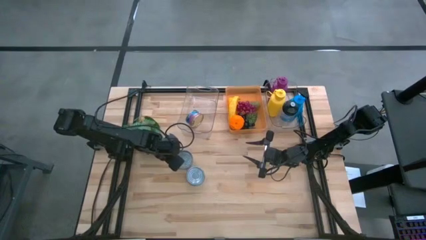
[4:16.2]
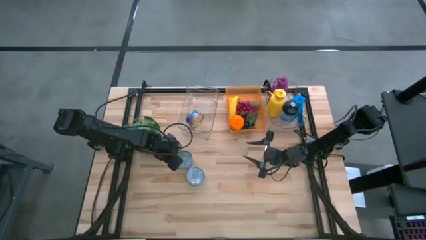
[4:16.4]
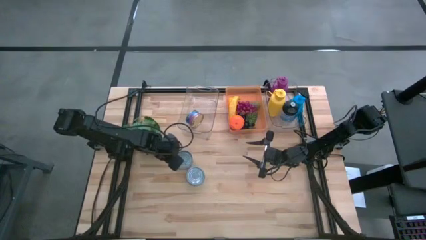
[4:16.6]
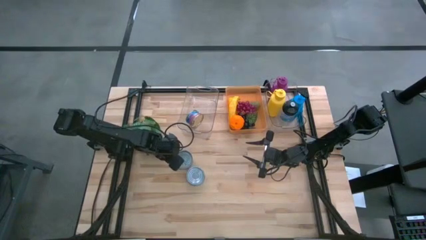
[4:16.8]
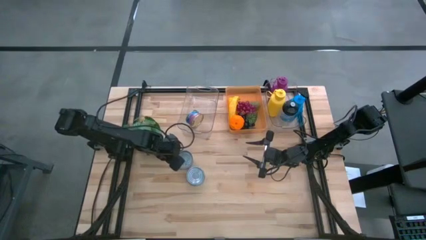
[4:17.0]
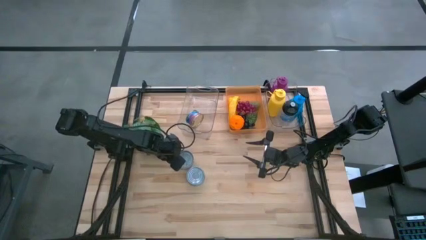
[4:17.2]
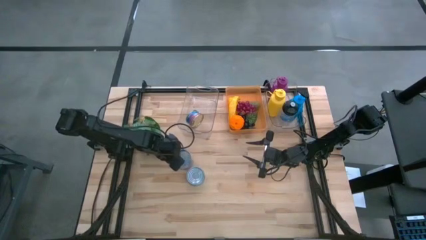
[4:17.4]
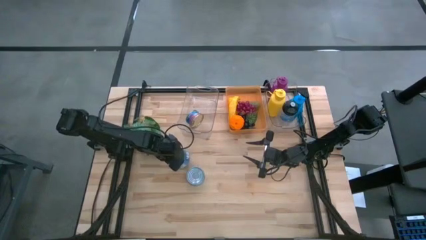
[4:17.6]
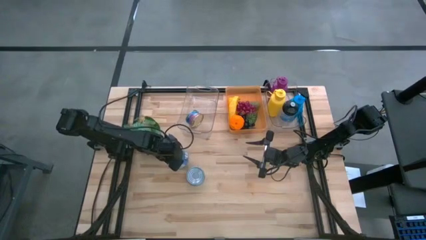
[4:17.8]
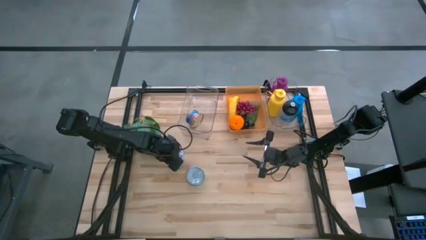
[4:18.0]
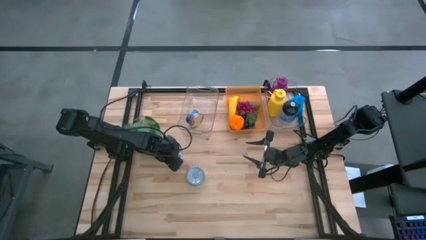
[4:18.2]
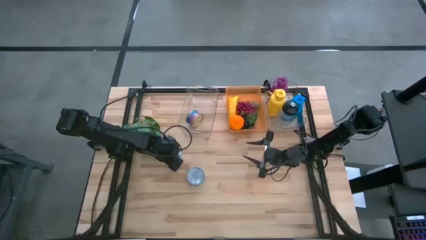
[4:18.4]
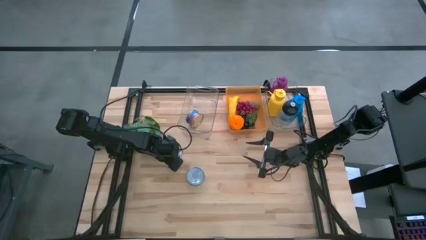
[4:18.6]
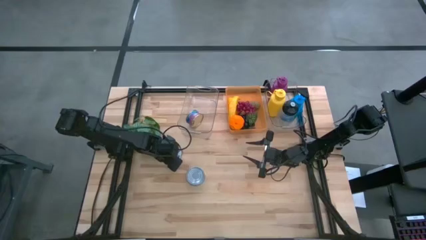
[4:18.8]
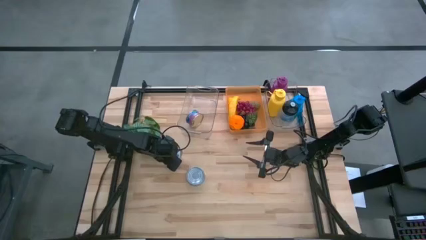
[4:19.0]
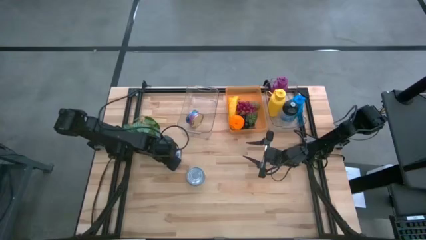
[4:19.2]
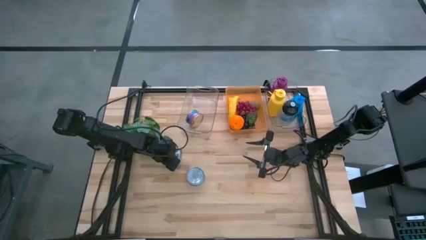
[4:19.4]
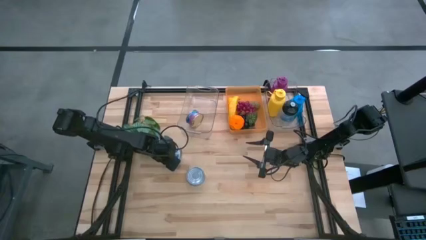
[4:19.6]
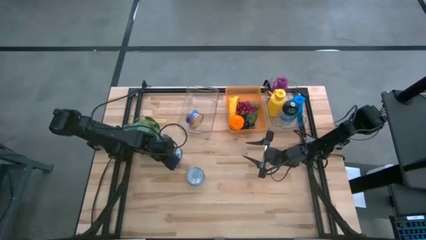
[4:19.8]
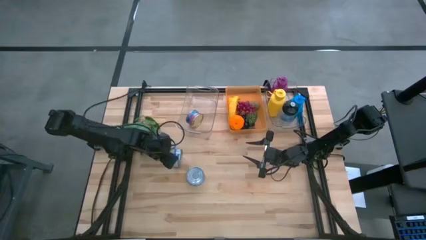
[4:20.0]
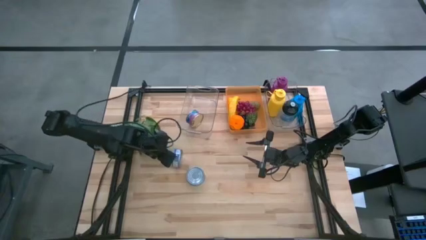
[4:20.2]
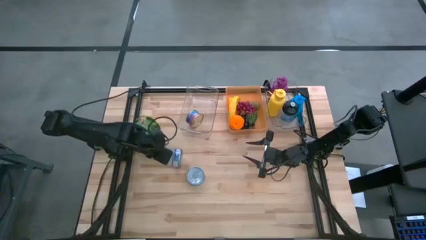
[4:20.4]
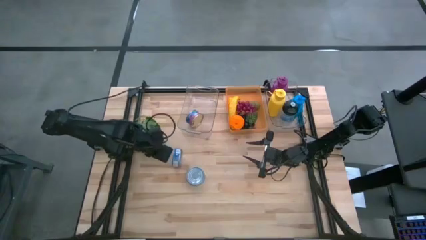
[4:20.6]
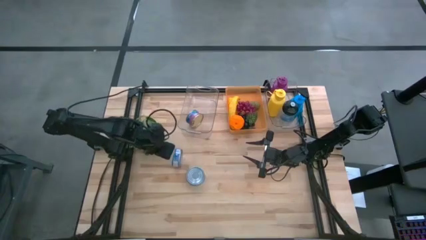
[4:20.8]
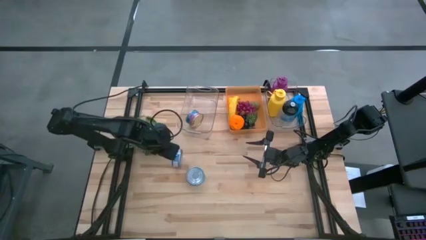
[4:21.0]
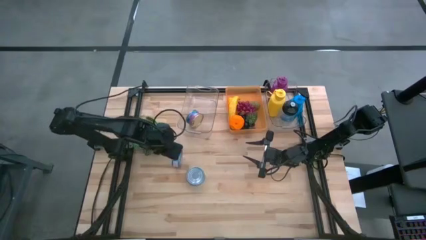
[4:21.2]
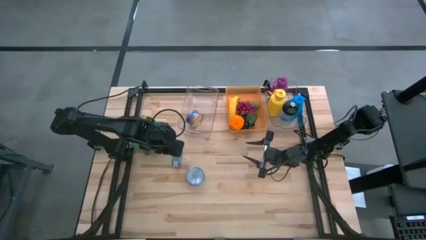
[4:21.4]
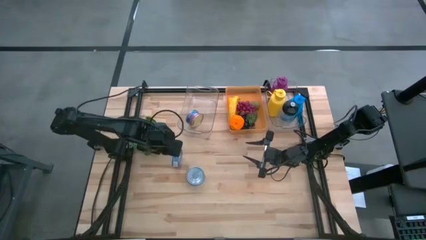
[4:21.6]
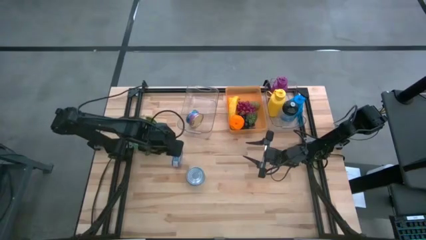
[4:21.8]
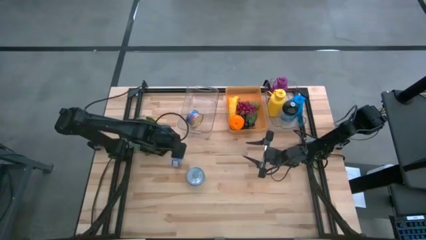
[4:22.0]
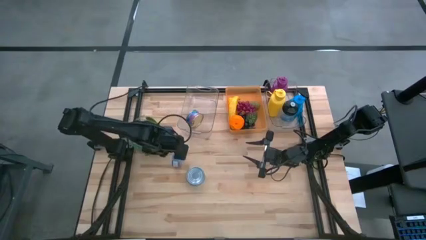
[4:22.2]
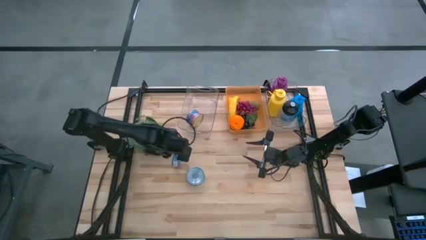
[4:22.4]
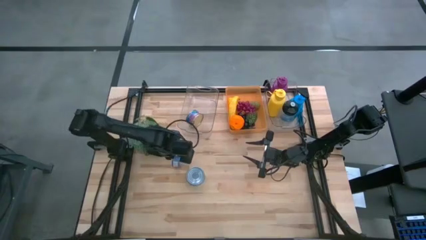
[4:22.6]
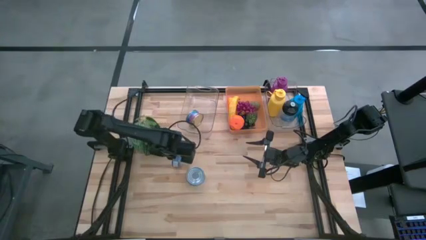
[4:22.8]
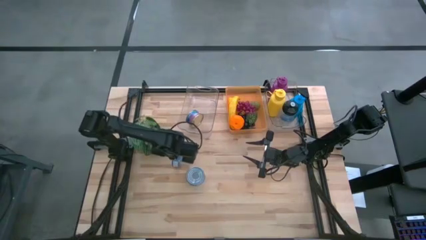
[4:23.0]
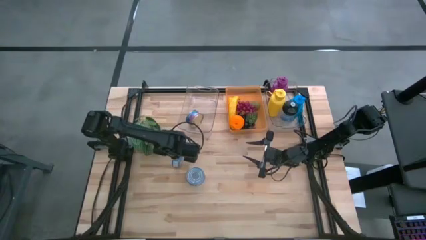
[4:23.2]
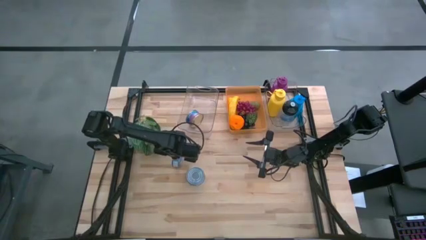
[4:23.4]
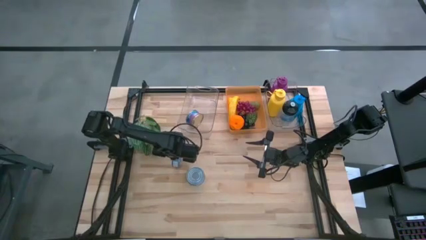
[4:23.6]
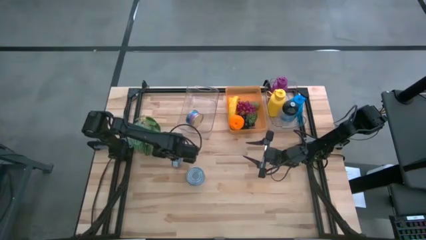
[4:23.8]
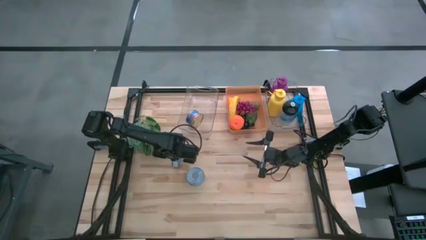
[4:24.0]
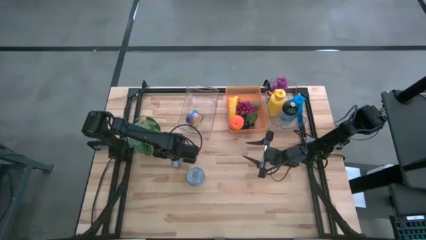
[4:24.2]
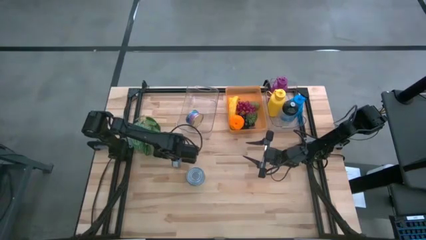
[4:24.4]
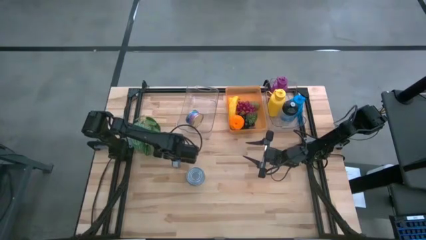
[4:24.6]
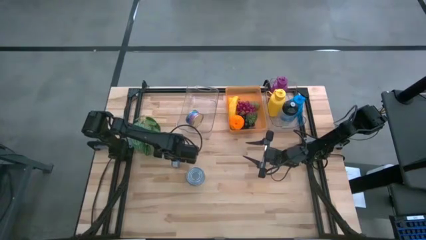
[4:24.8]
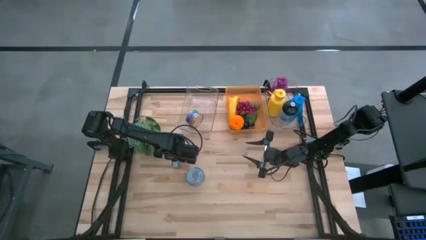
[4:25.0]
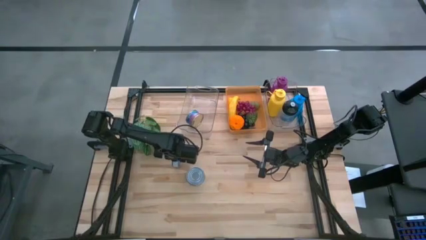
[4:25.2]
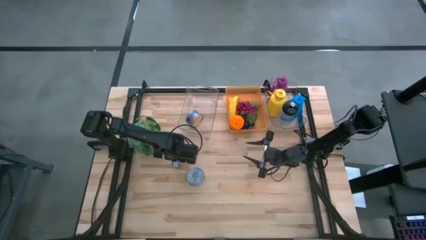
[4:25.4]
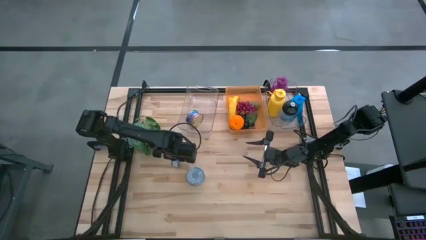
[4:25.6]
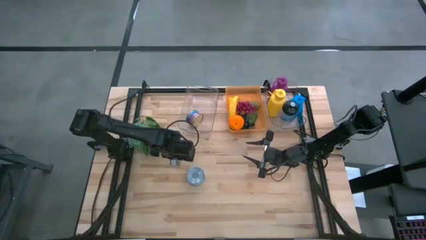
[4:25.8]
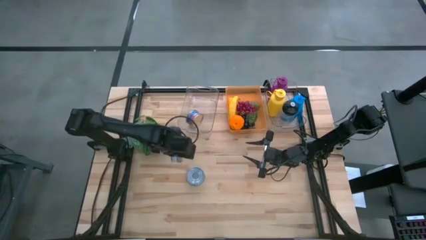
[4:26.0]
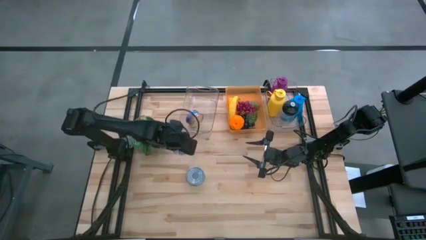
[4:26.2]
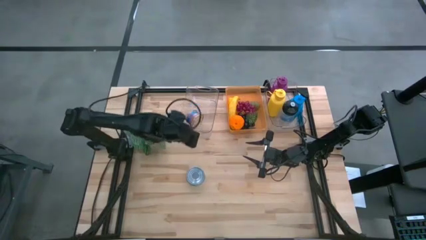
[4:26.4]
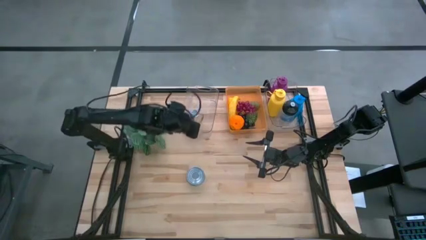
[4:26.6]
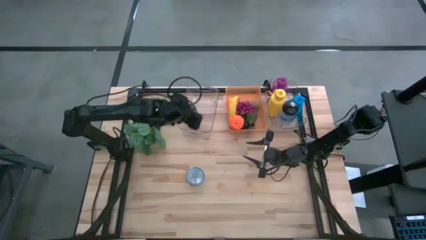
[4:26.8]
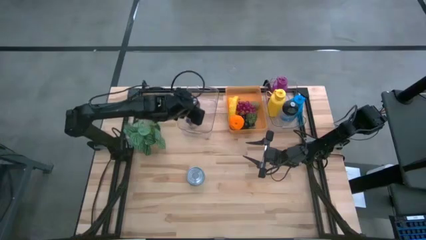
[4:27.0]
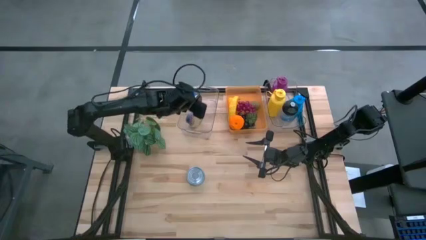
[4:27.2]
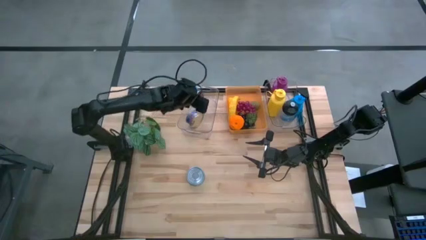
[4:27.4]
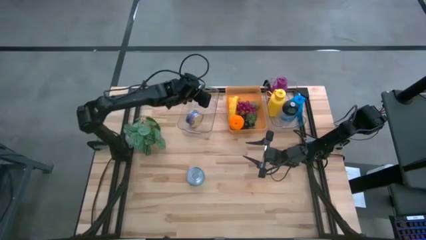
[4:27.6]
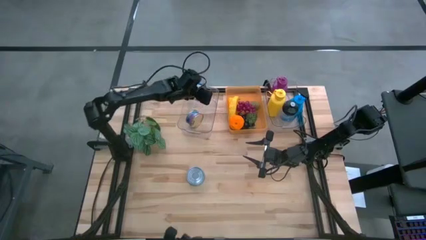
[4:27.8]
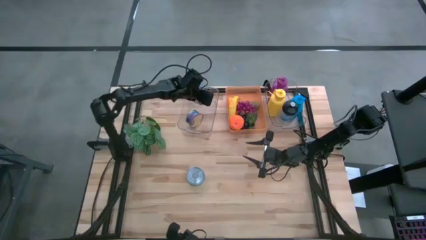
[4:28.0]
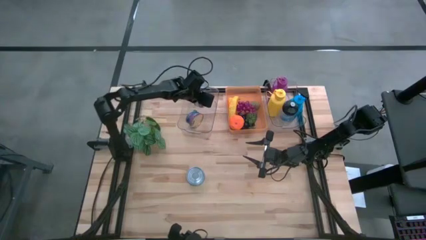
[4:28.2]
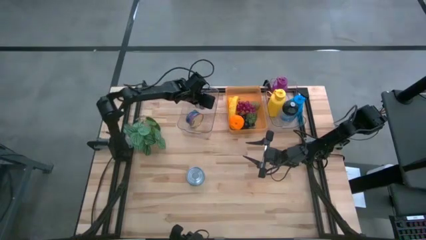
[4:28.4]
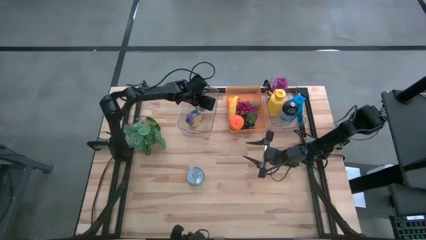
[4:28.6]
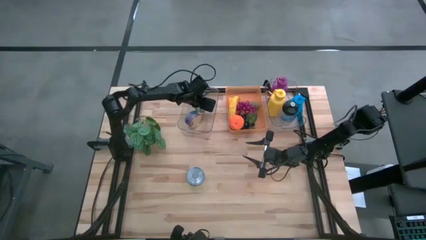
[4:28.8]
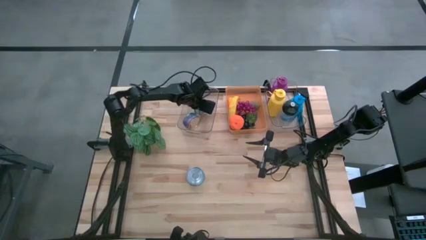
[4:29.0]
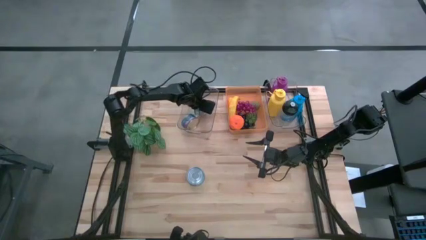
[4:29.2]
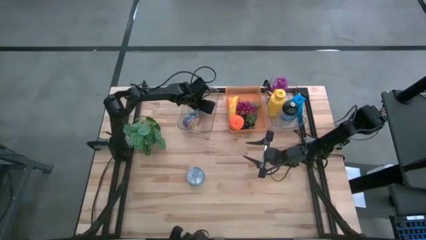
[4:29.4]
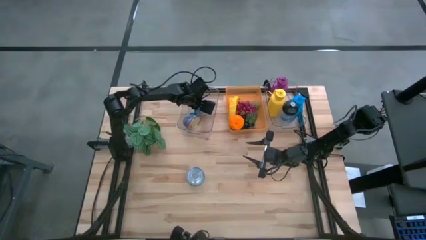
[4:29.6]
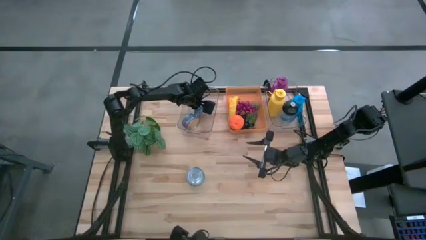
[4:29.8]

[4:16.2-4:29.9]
Task: Pick & Place Food Item
Put the blue can into the left transparent bin

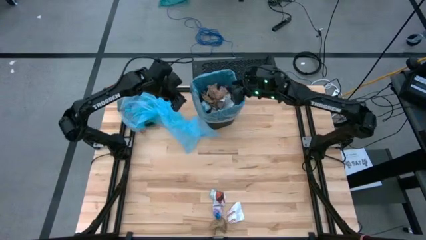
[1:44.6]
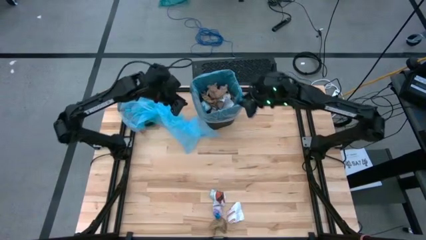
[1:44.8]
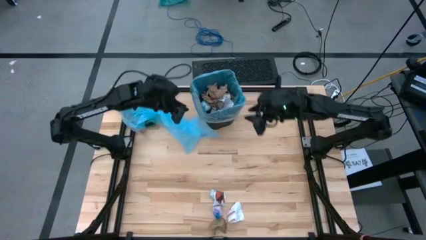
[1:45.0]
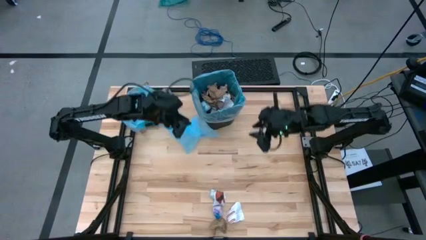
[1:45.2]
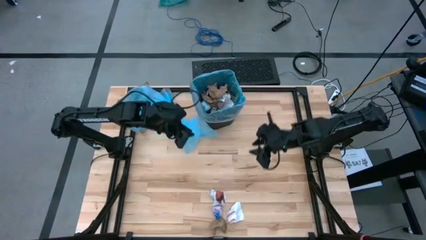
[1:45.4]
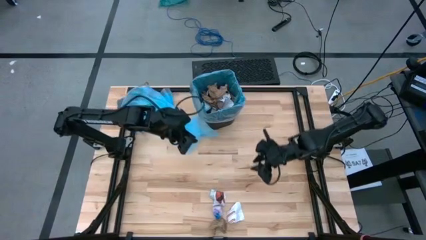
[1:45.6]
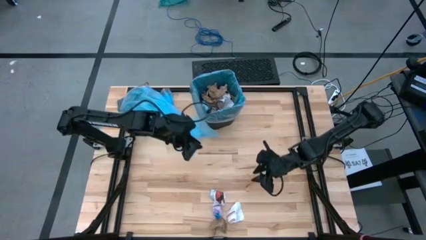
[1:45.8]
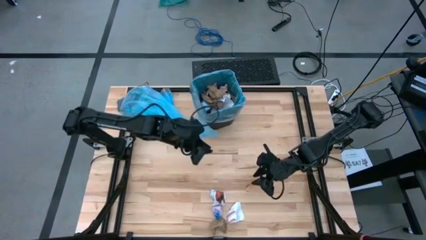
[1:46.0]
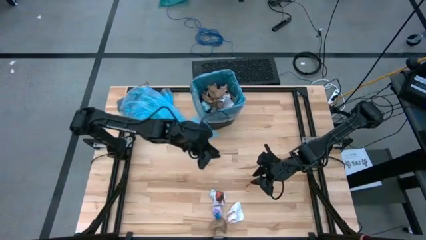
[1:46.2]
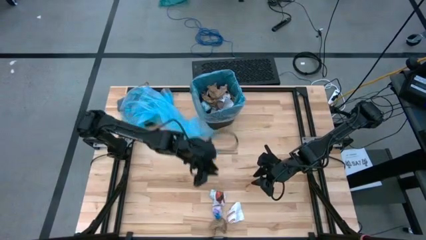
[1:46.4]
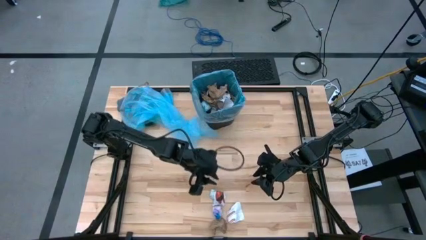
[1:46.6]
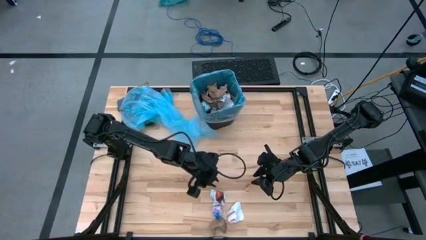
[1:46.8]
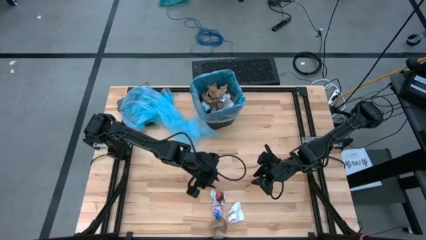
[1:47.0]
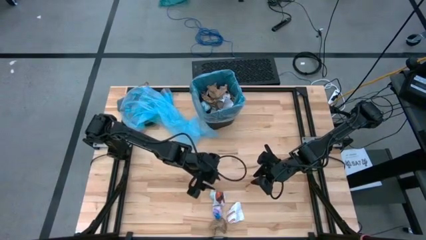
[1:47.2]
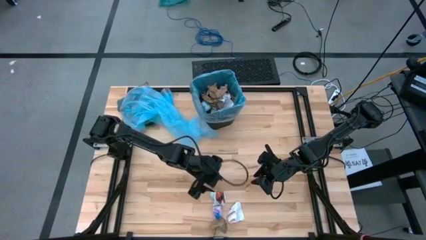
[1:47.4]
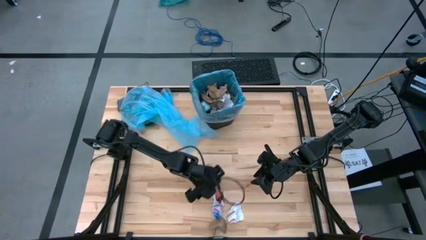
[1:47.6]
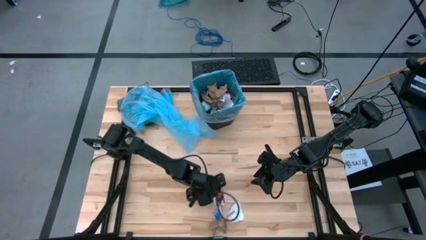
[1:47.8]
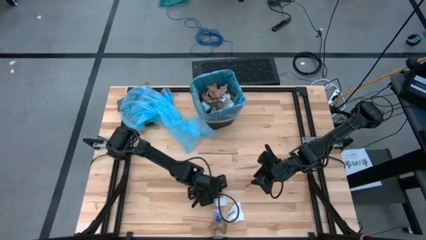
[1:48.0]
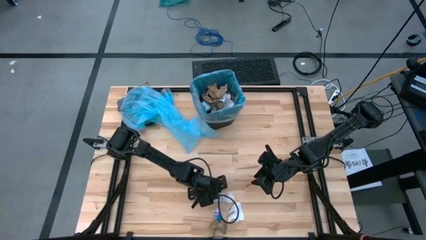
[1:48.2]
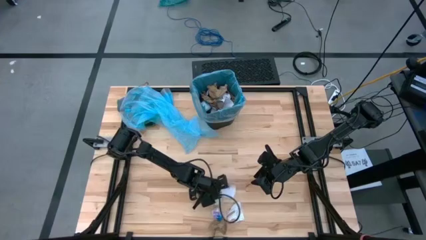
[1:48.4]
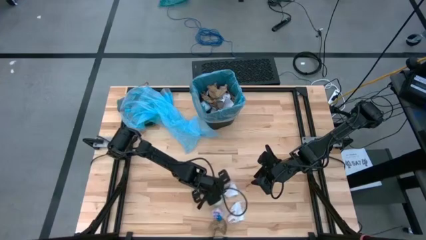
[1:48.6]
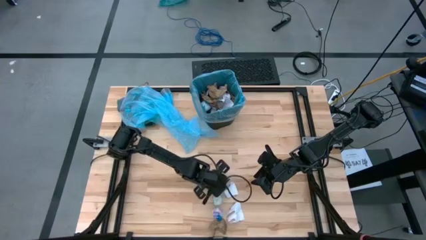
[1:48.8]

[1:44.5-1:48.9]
Task: place trash/remove bag and relplace
Put the blue crumpled plastic bag into the trash bin
